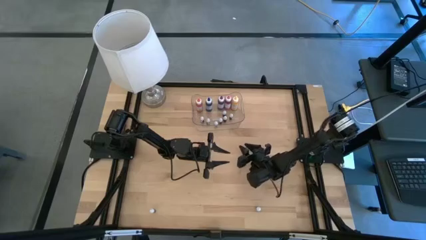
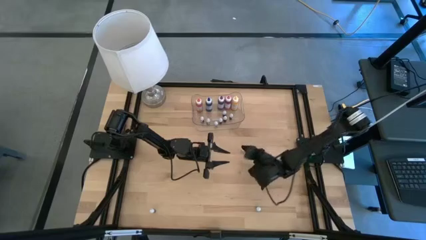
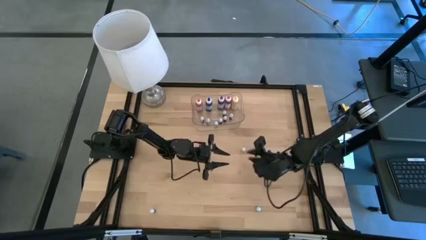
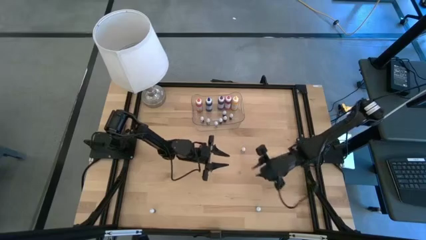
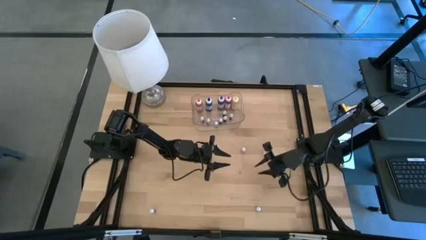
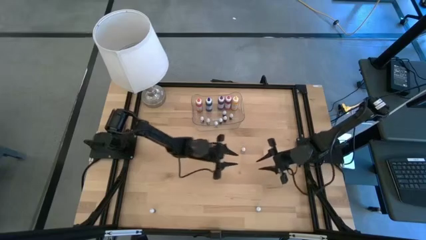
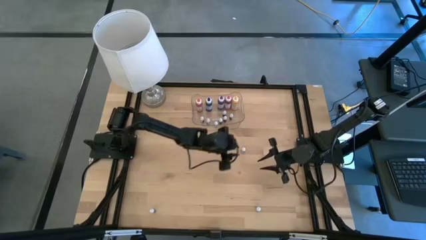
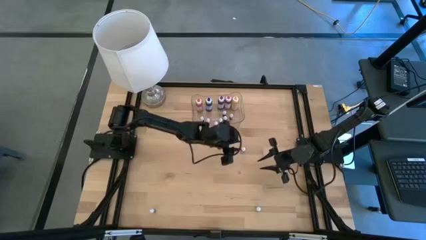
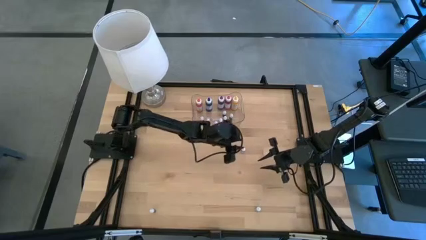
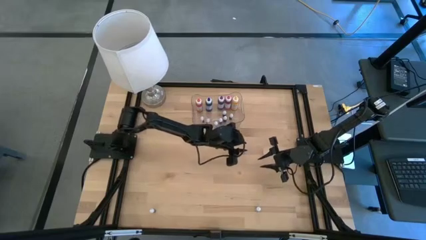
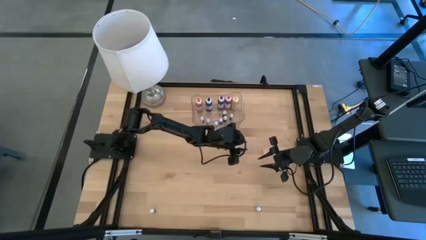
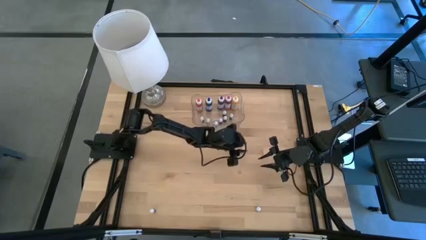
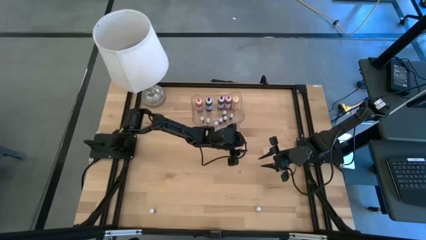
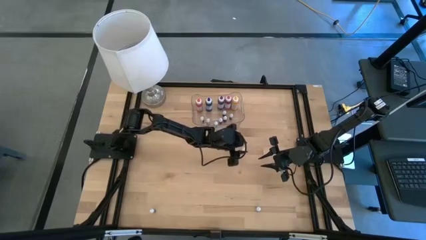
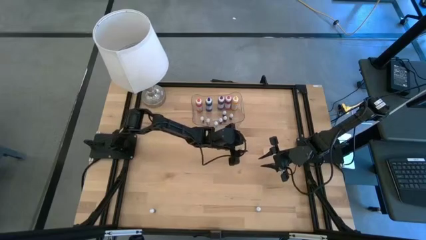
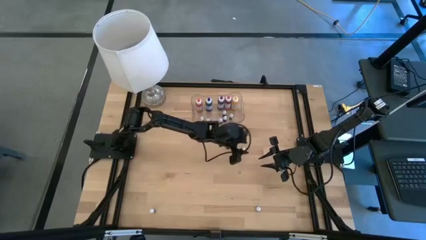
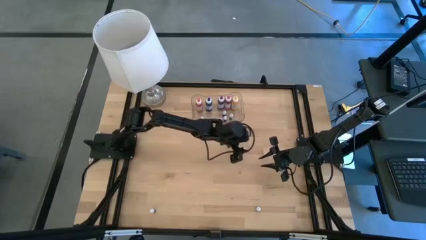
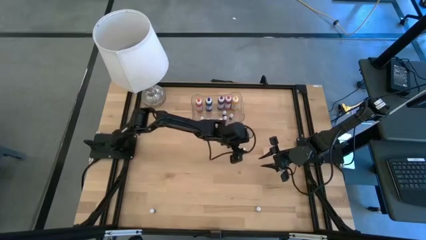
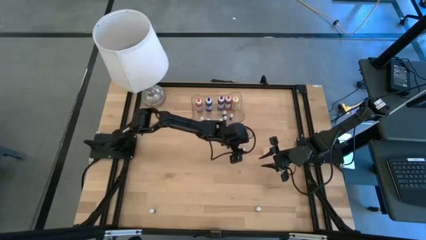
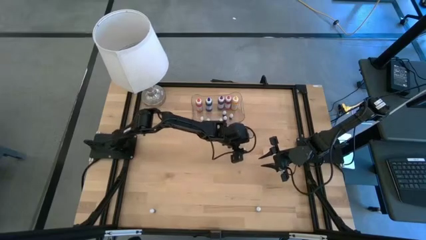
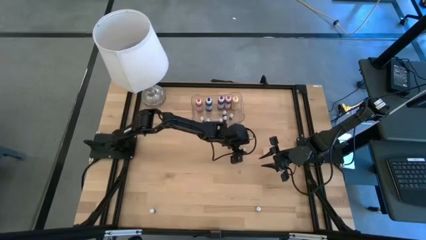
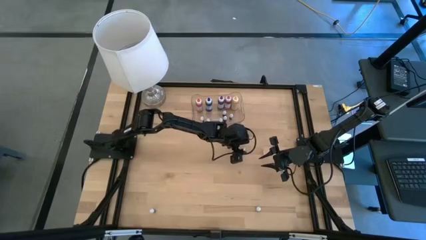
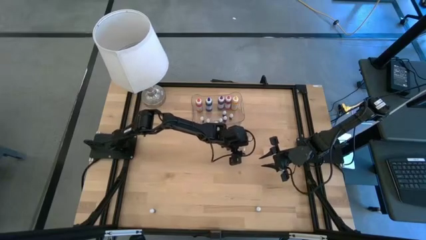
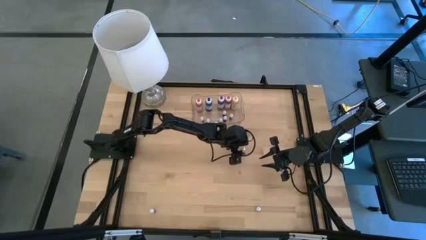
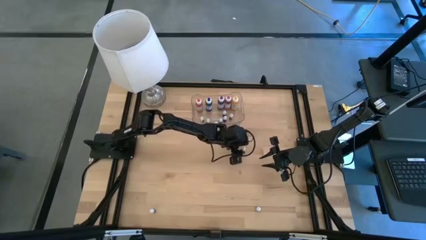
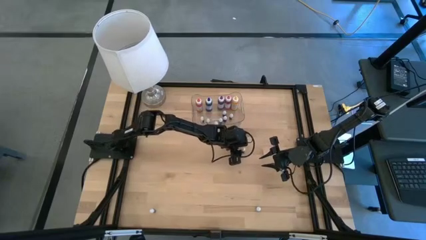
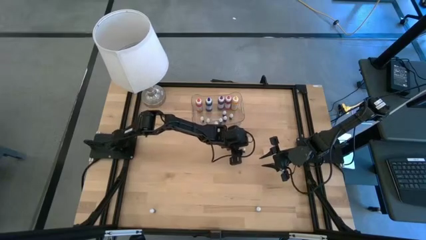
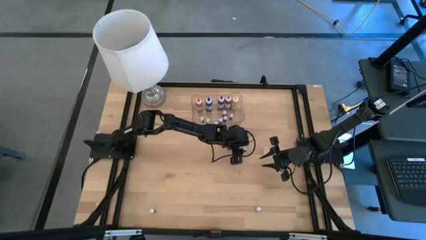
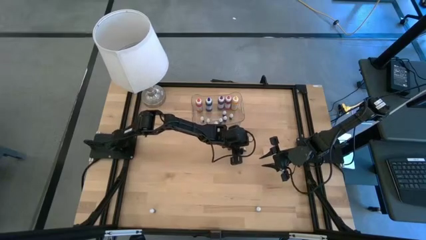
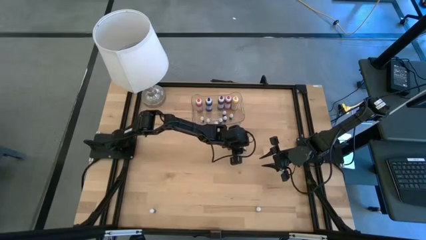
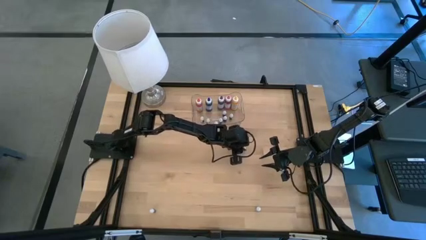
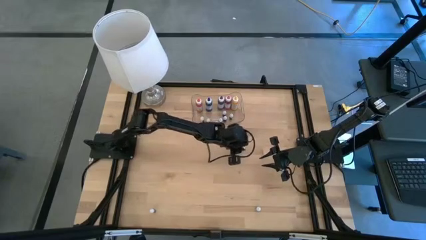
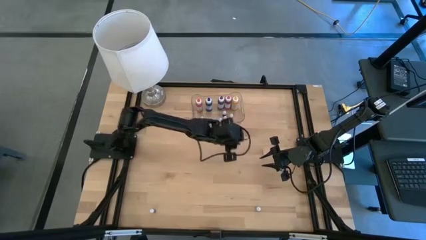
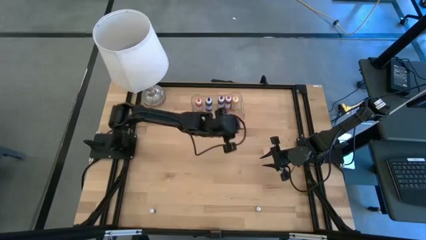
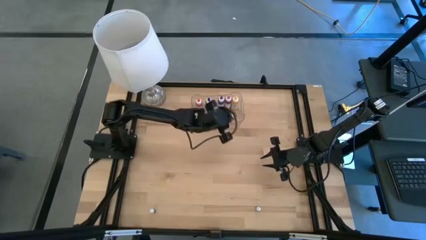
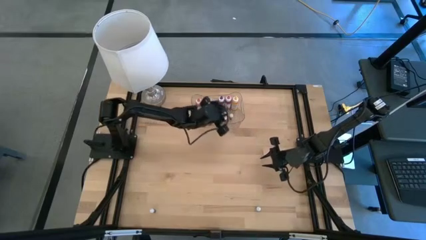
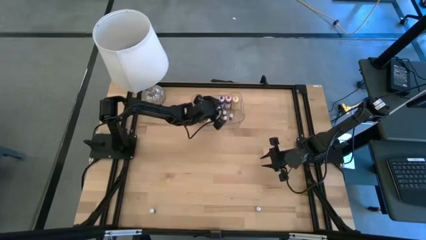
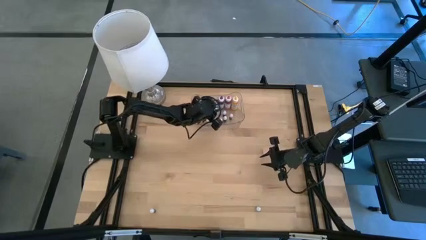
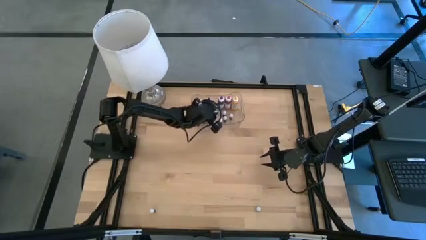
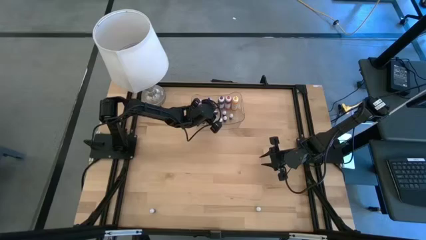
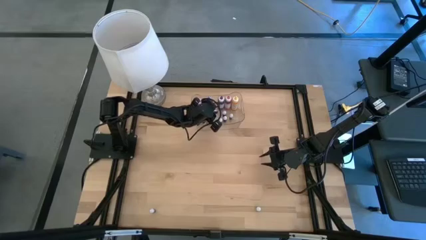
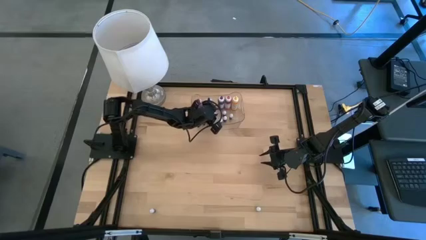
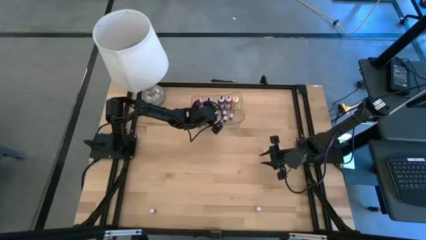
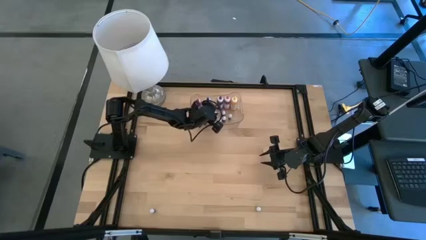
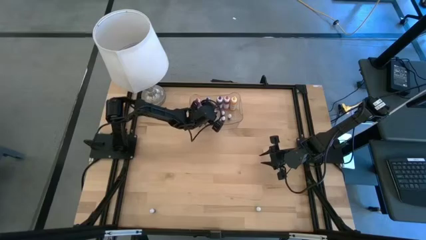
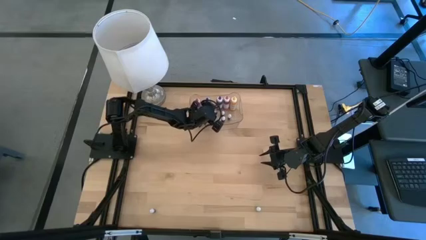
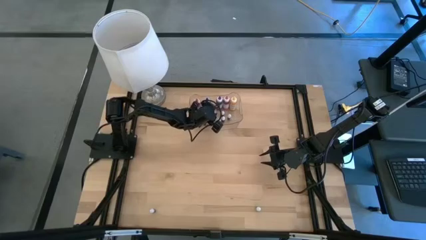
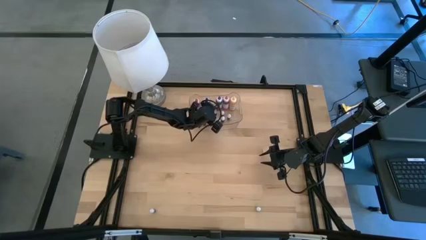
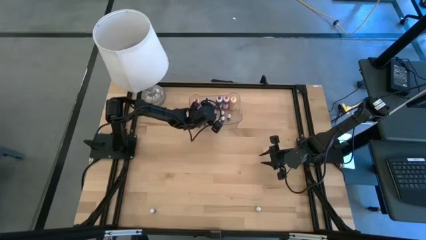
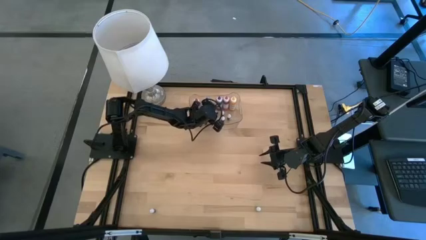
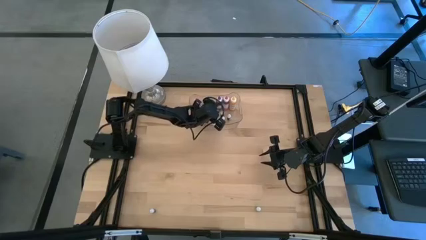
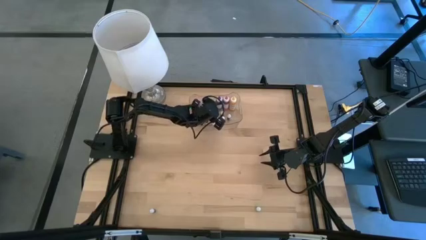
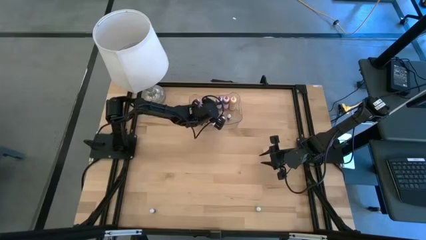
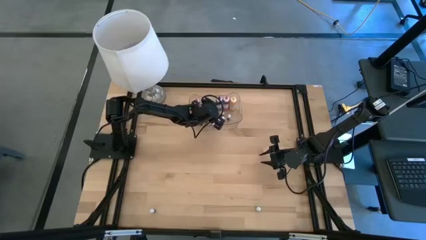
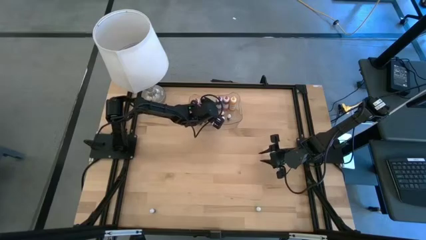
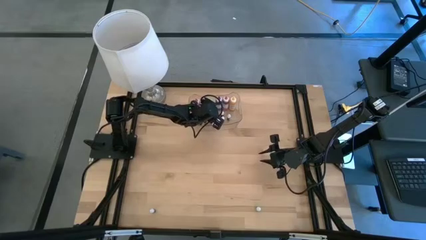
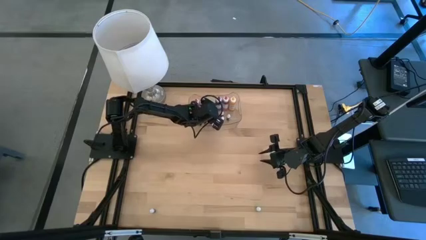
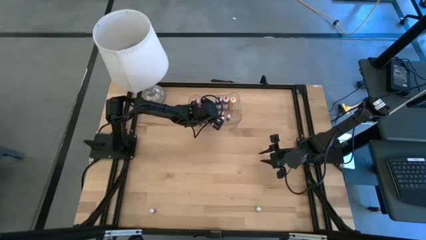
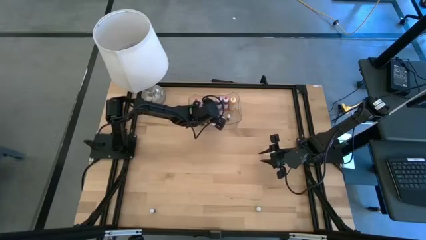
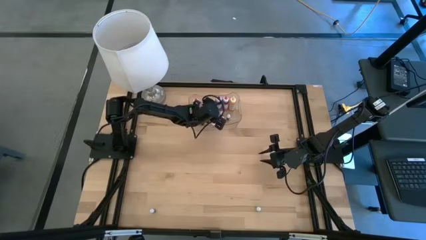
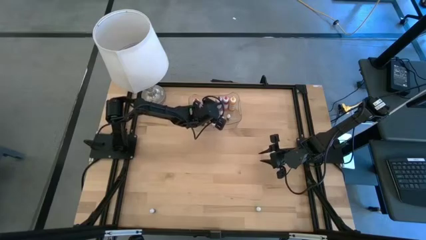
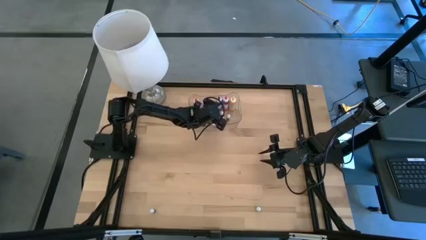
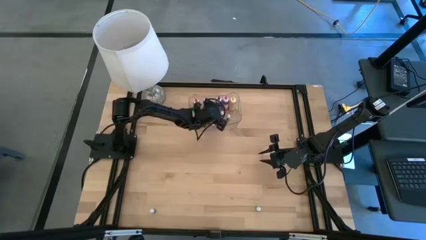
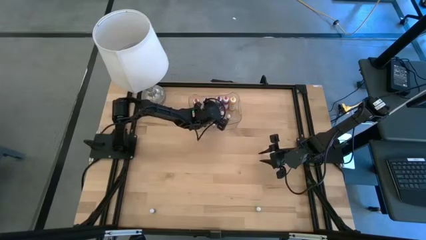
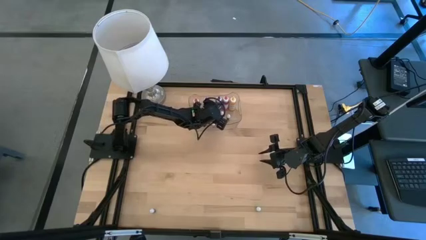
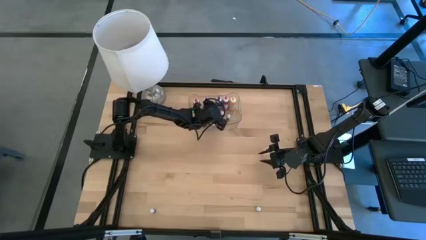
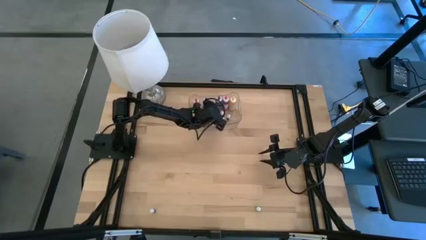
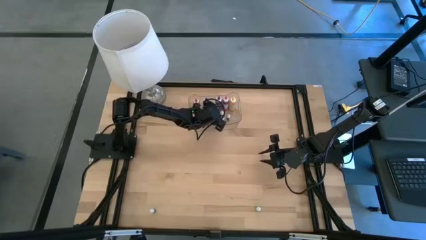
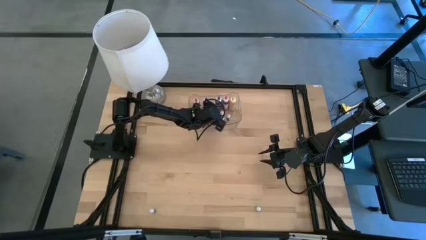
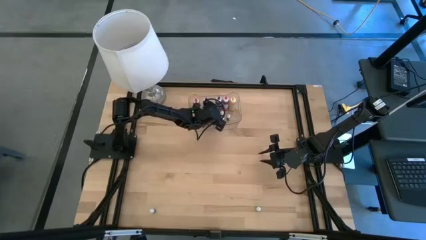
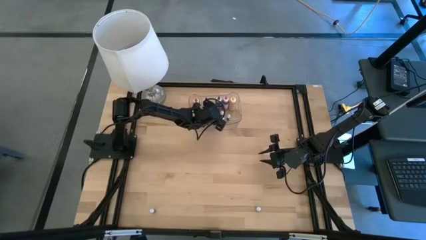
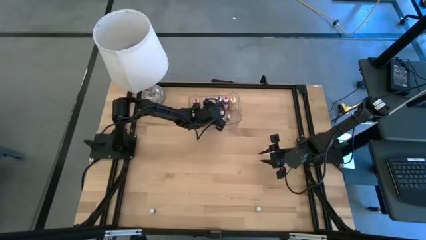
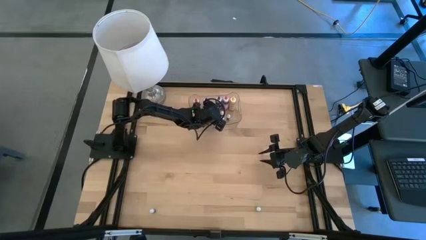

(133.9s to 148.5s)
Task: Pick & Place food coloring
Put the top small purple food coloring bottle into the transparent bin

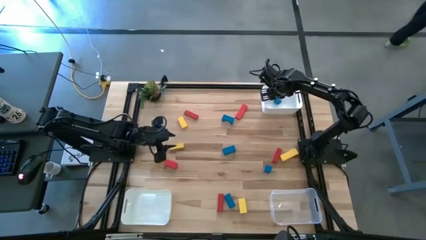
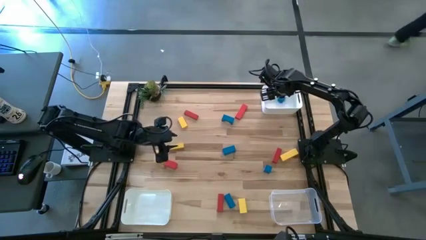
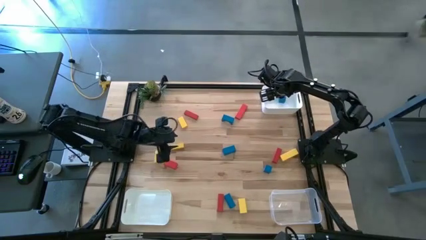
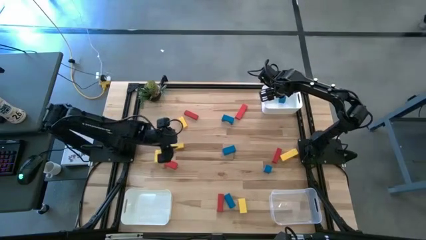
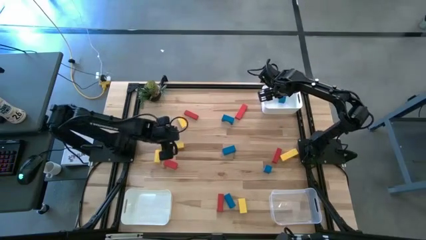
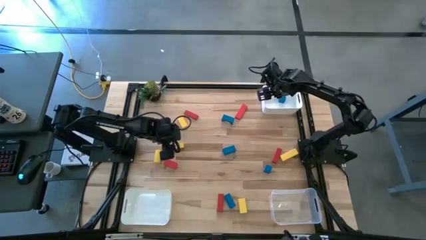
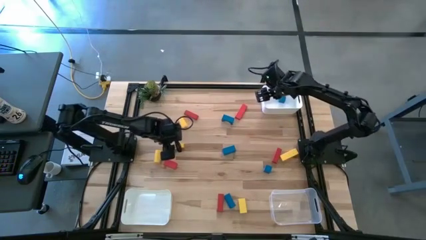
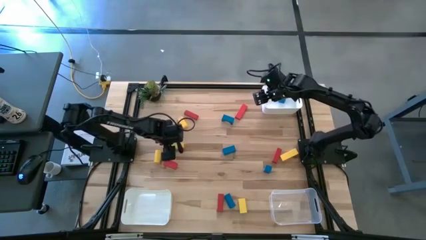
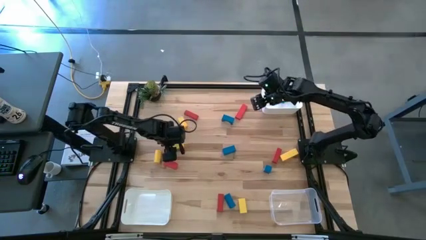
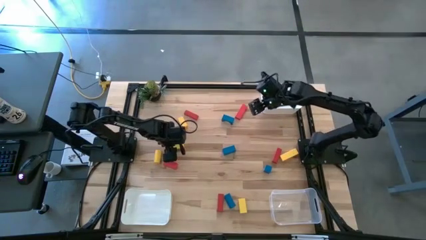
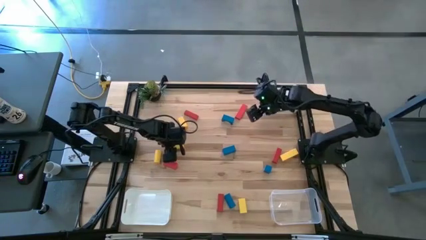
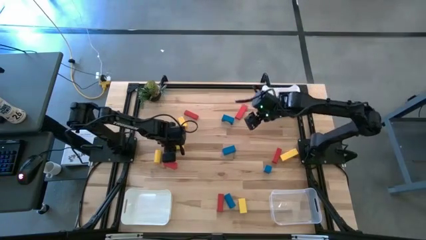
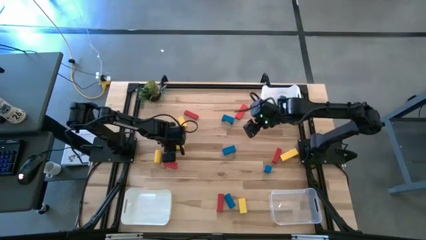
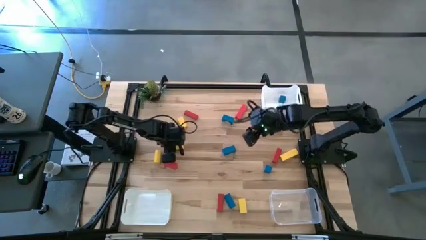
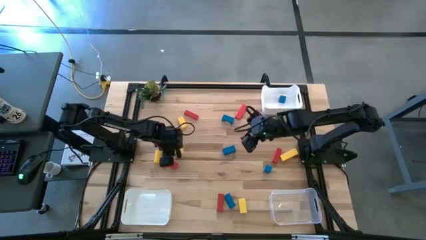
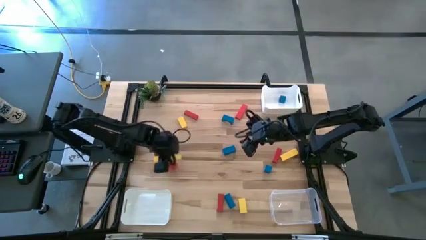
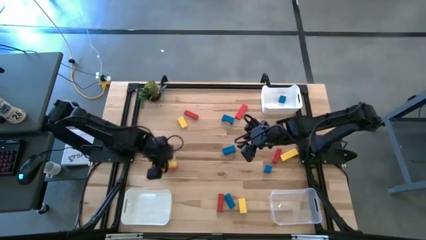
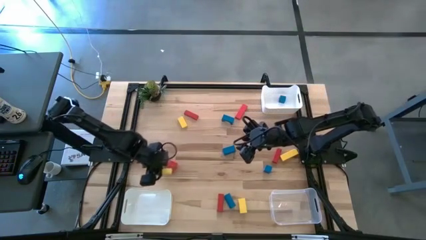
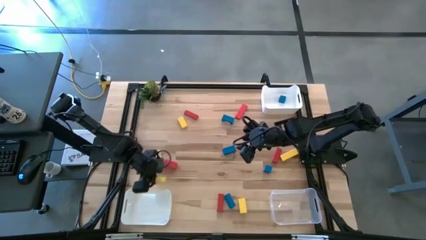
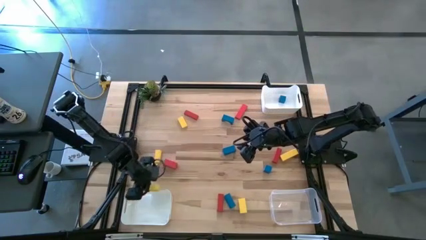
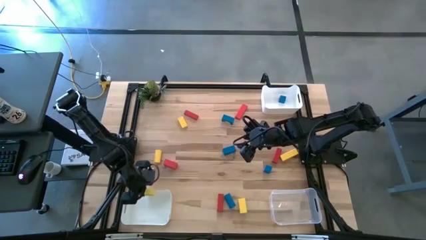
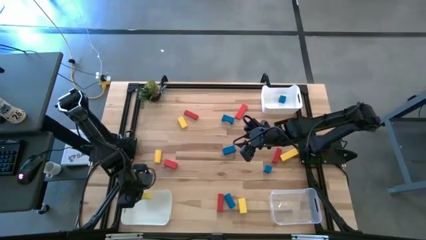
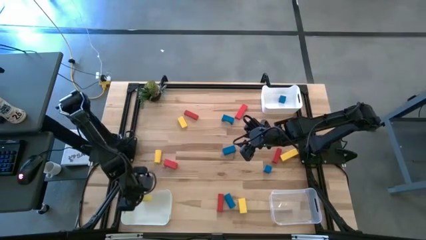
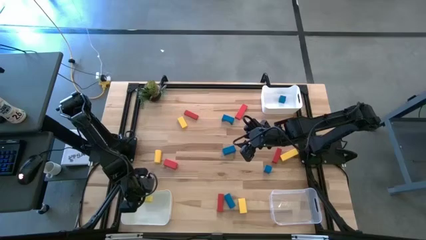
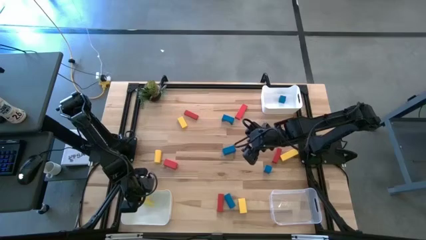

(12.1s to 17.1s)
Task: Sort & place blocks by color
Put the yellow block into the bottom white bin
